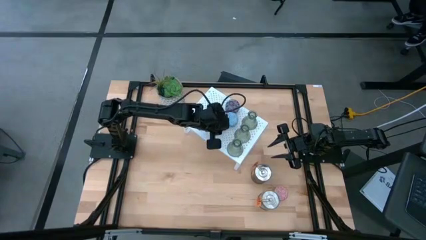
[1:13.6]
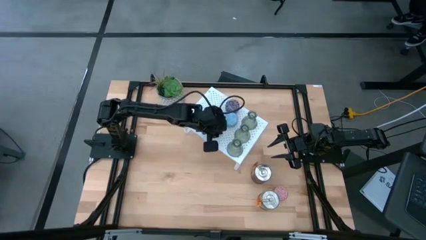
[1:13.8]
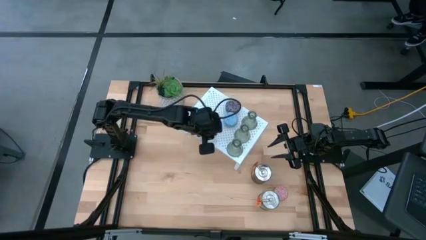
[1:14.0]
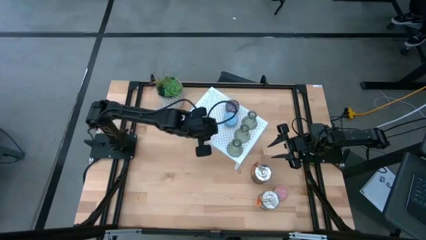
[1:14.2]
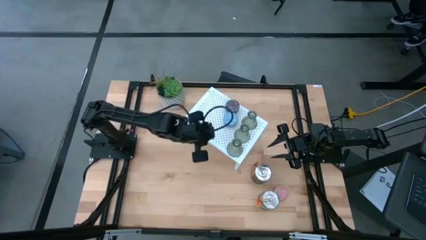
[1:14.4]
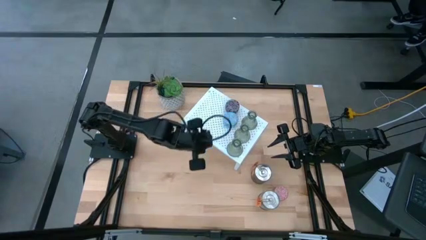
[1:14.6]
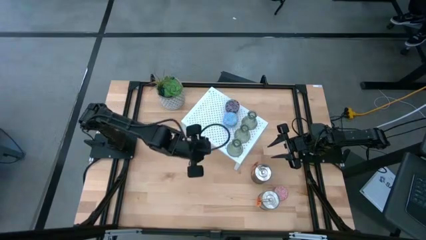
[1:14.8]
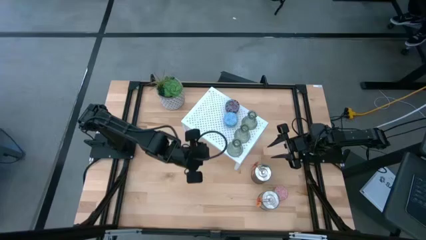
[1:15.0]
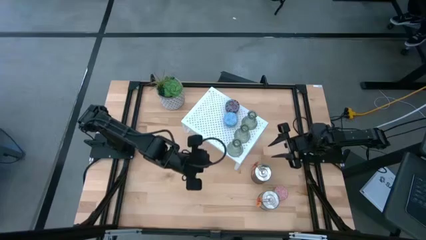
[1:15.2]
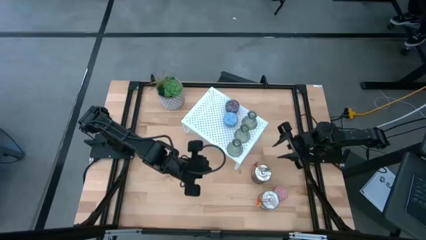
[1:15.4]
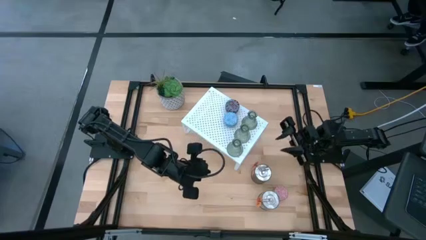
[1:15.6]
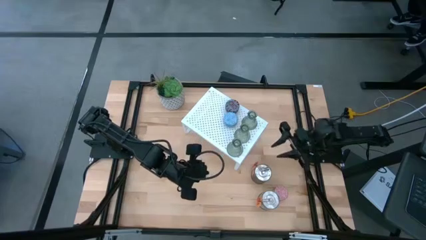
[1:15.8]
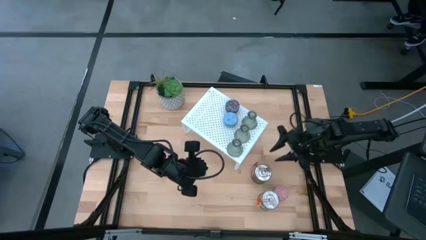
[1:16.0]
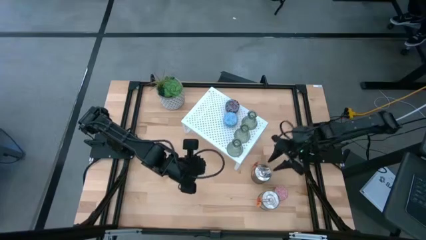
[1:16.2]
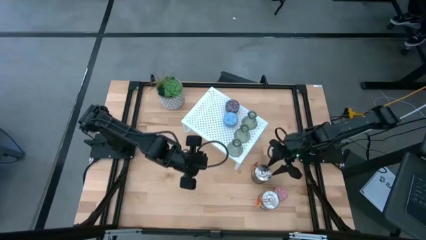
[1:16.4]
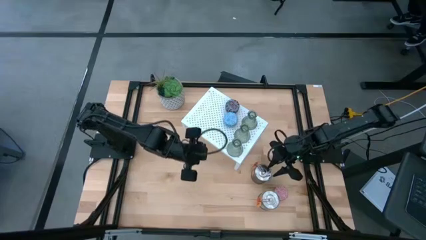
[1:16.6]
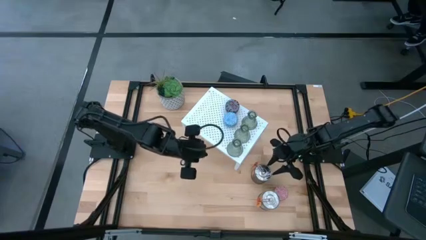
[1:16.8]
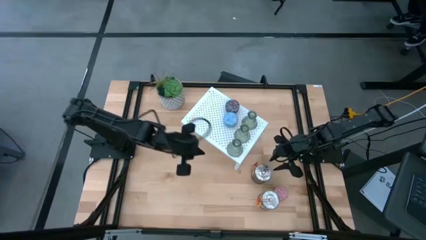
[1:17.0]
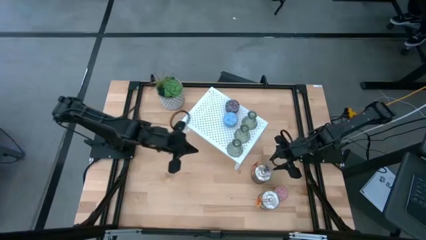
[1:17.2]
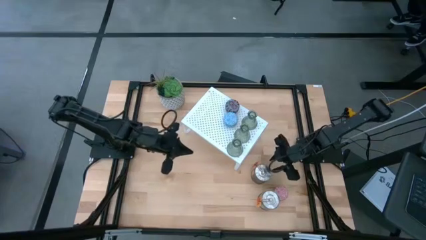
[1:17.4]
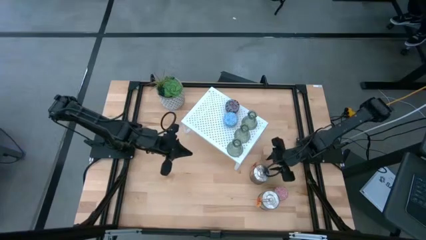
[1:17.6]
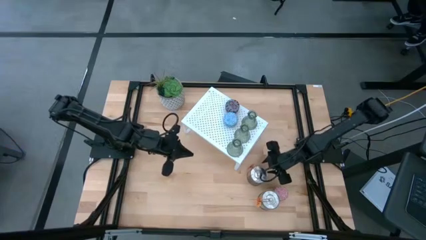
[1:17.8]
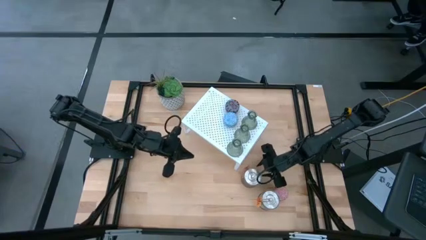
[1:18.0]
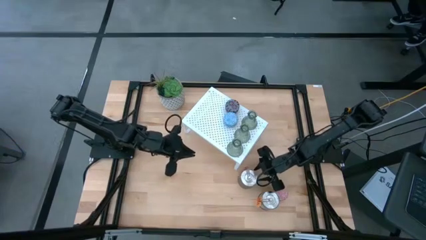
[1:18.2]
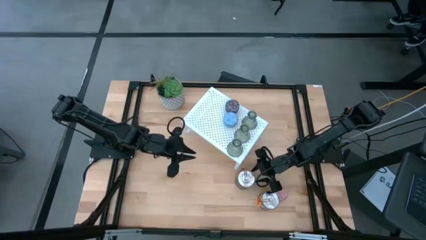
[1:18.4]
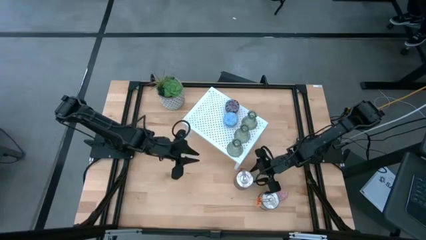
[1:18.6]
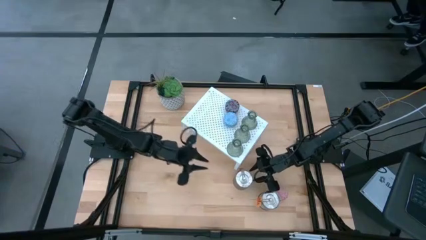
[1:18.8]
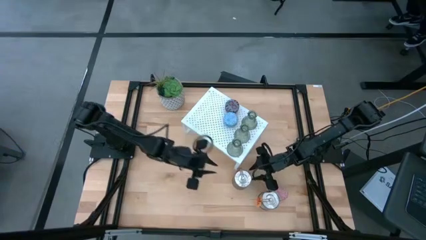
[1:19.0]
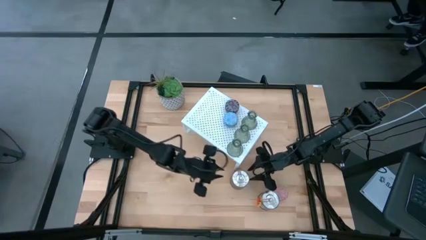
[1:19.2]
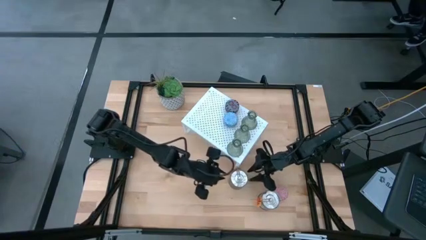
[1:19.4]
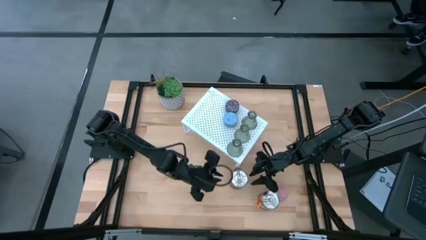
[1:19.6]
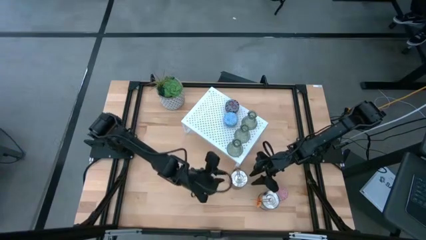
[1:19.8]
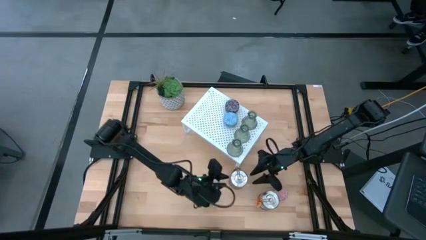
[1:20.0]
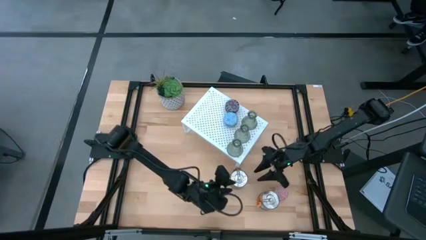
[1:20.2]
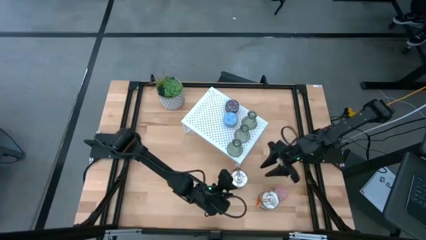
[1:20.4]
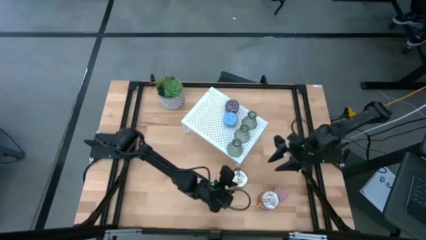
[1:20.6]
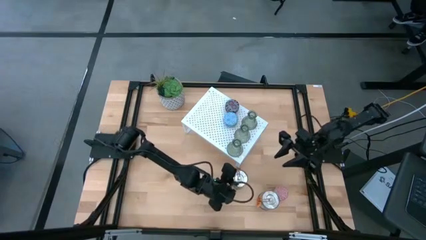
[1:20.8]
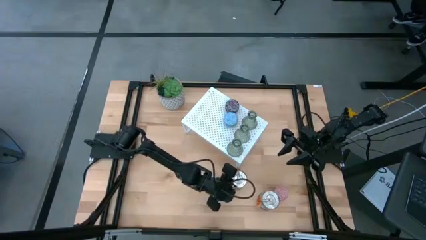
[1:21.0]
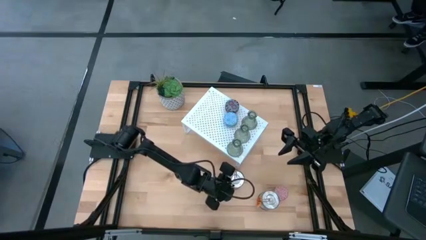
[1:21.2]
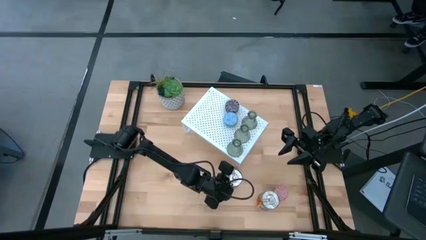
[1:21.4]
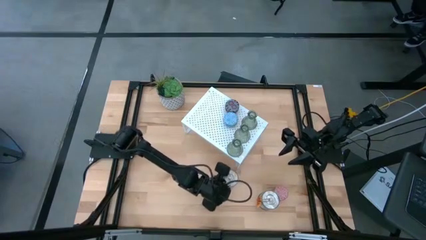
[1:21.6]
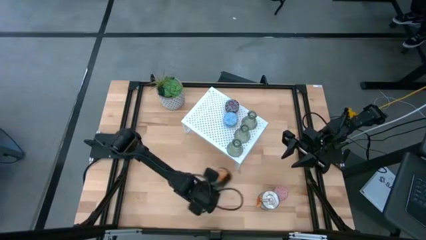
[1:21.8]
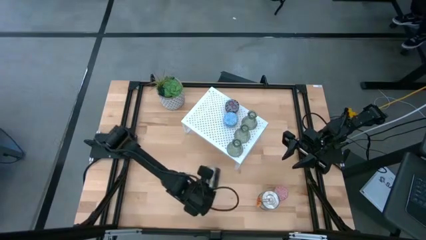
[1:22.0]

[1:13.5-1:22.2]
Task: Pick & Place candle stick holders
Move the top silver scented candle to the middle left of the table

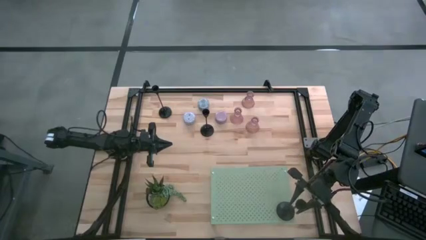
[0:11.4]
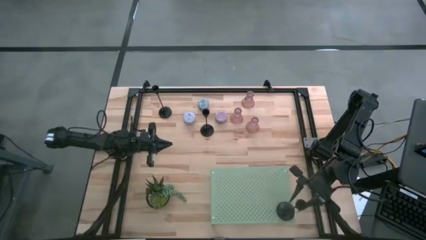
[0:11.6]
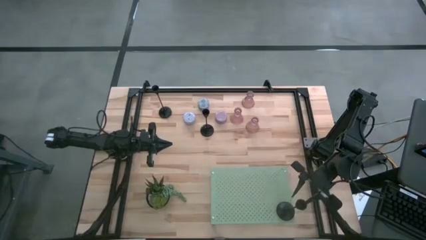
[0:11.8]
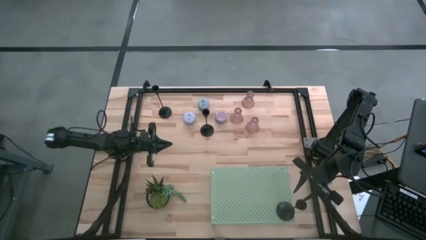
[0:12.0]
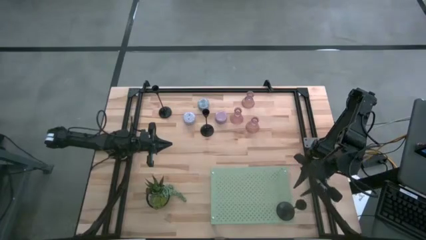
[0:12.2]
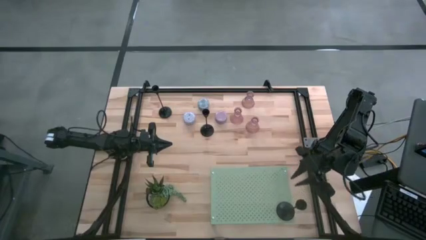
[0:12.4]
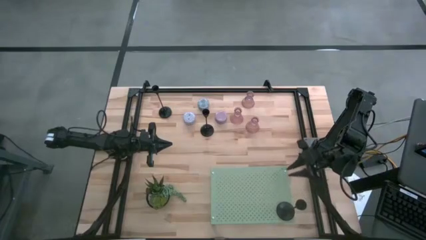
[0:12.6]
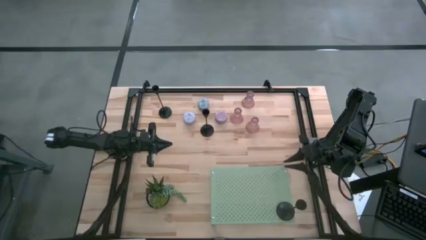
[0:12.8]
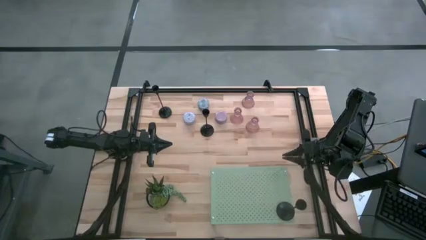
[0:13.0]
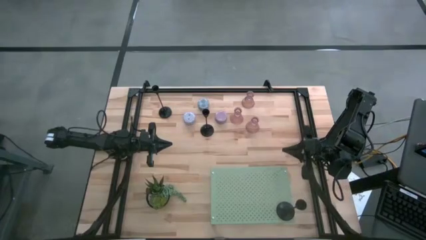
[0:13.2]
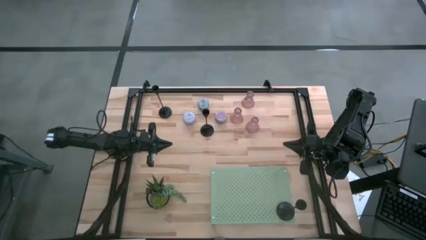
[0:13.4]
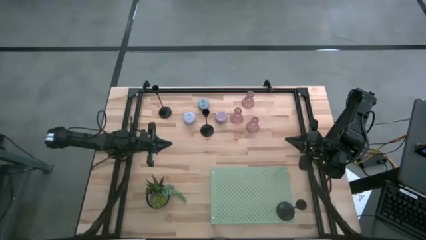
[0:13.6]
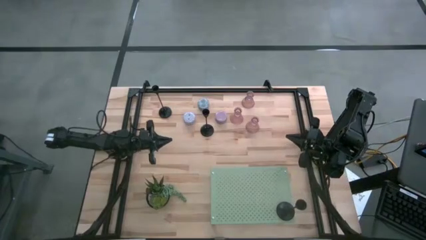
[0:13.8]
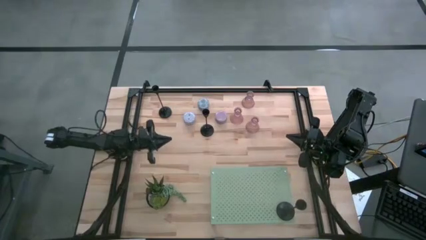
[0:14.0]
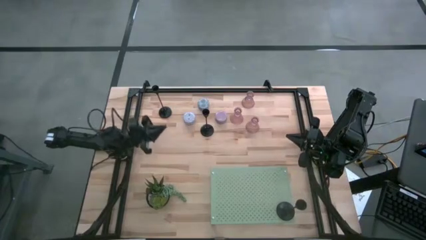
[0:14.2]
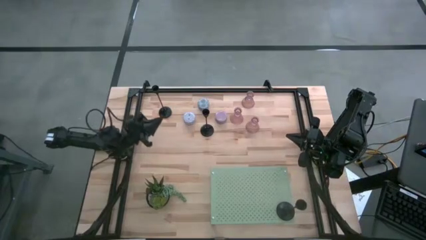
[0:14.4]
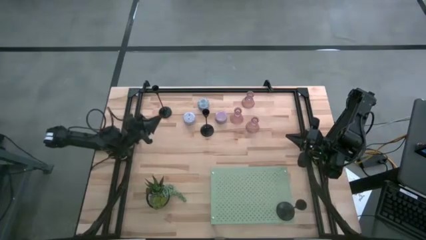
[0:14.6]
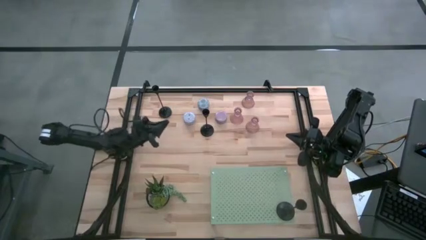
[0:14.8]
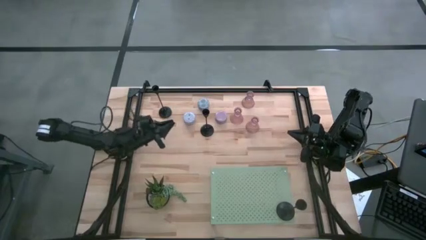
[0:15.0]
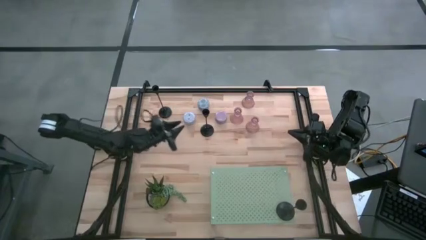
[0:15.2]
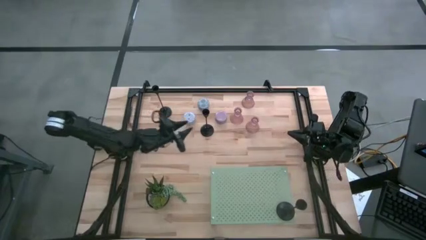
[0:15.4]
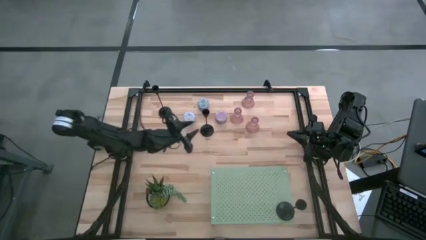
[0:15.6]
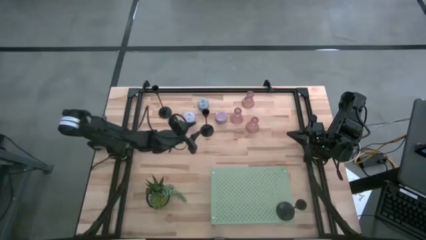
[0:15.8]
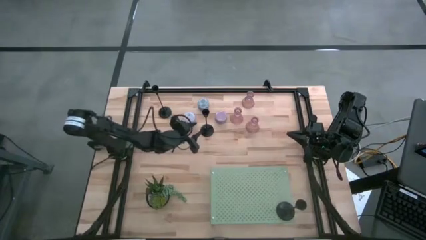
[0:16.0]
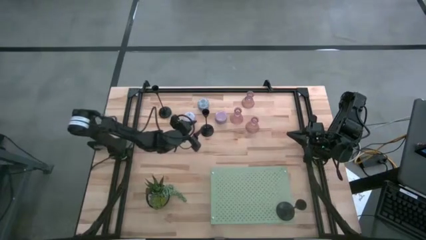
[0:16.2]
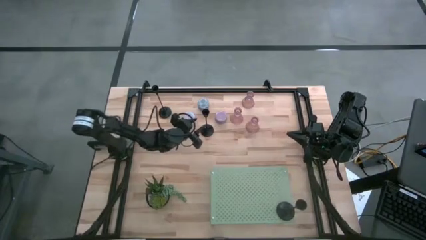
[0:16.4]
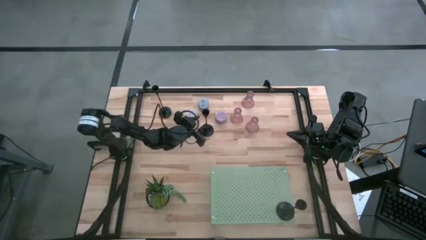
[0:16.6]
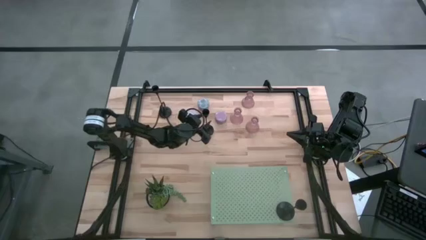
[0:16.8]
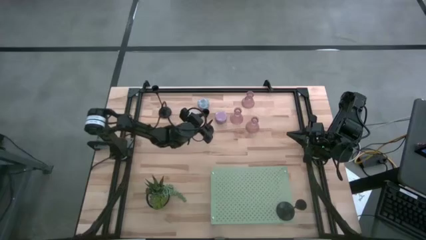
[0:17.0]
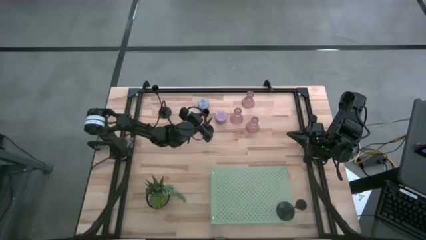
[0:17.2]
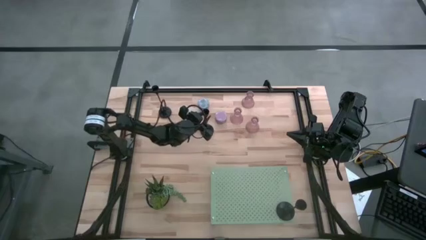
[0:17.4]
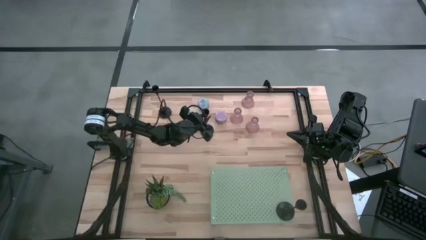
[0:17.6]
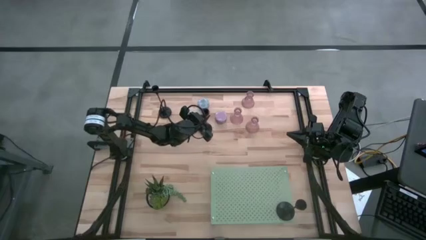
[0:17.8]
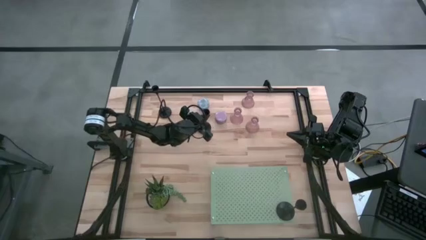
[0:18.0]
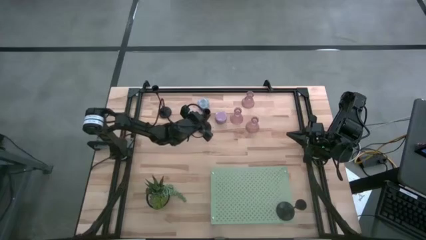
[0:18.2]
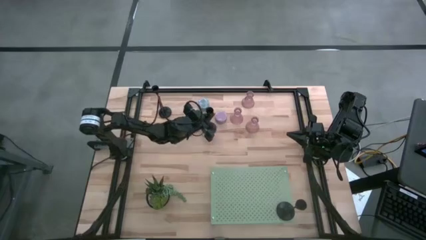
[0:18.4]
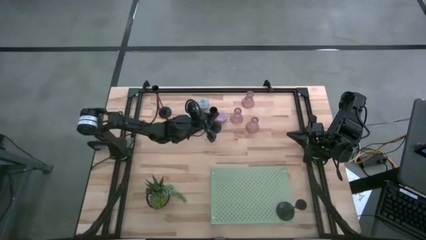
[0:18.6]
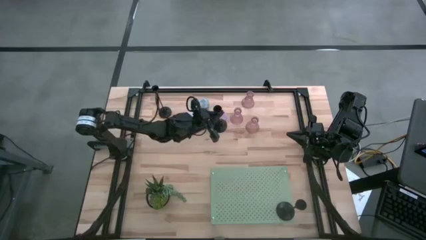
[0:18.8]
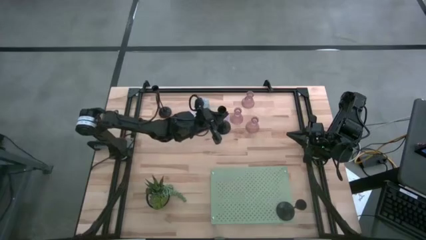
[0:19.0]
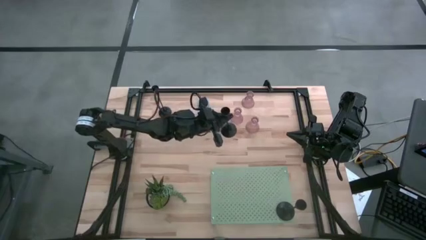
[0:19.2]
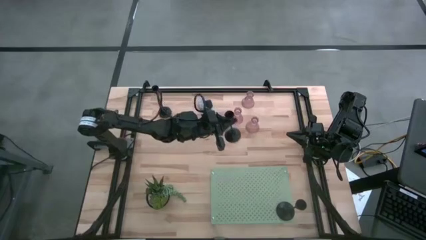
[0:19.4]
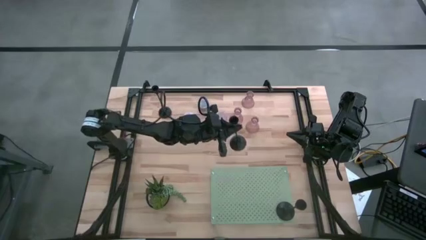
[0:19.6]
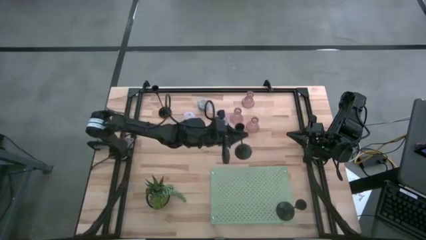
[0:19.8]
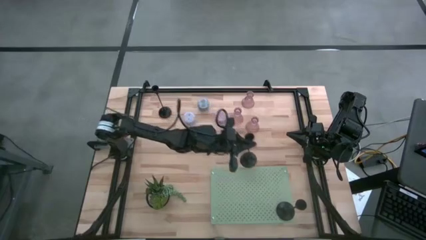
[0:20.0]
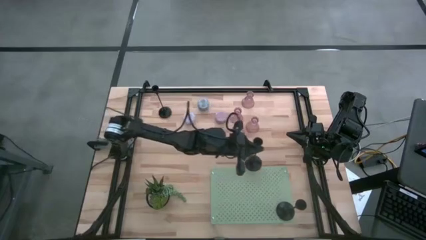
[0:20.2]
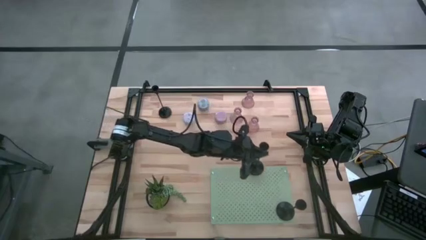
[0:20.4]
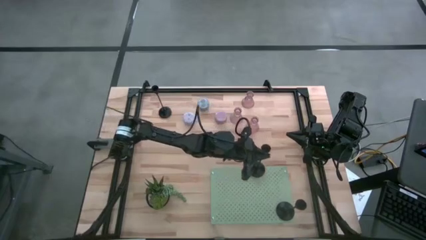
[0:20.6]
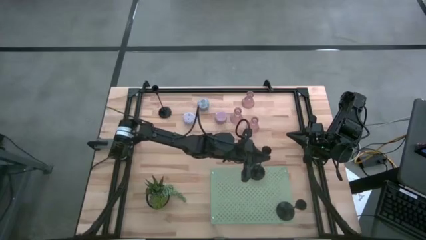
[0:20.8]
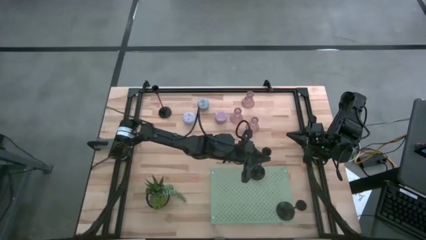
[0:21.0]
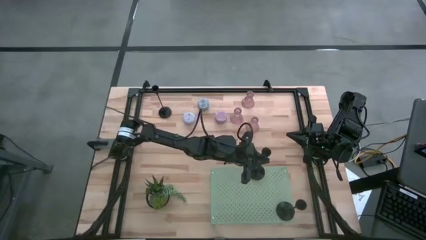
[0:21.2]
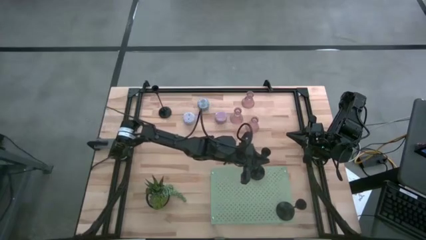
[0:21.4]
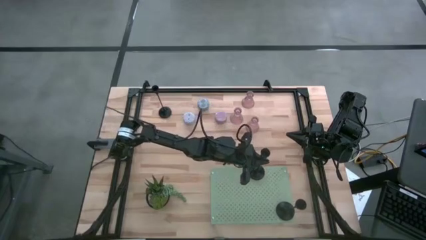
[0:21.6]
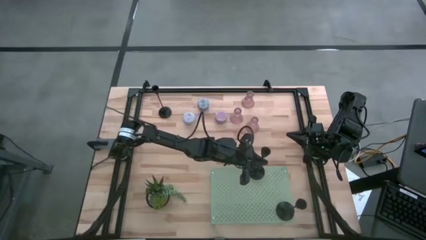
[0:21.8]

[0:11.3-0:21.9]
Task: Pick & Place candle stick holders
Put the right black candle holder on the shelf aligned with the other black candle holder
